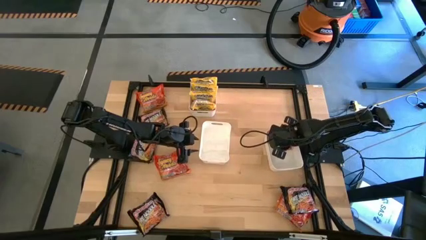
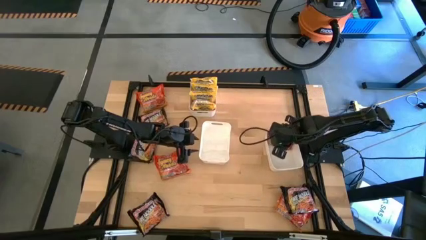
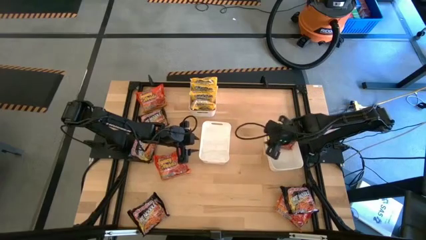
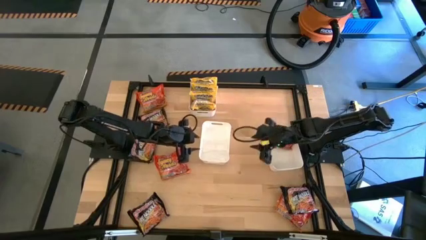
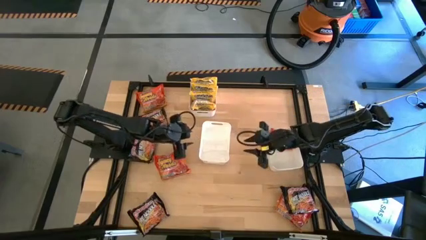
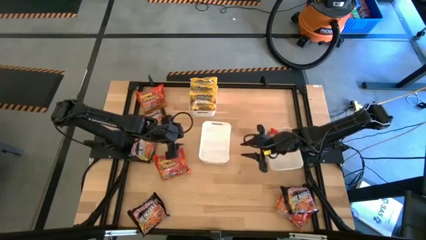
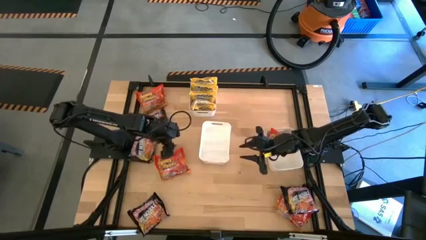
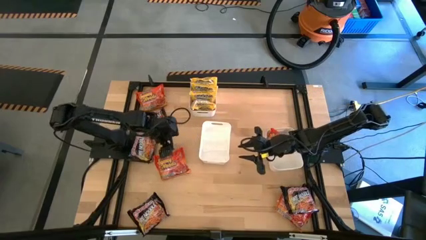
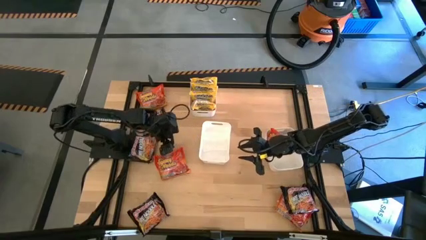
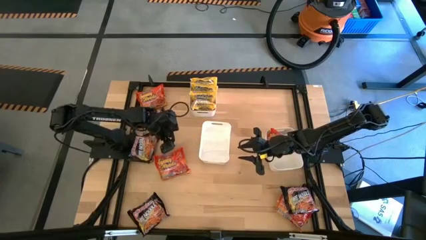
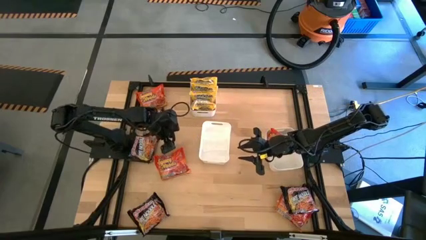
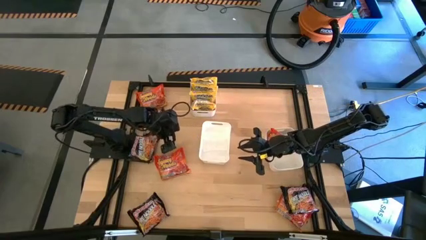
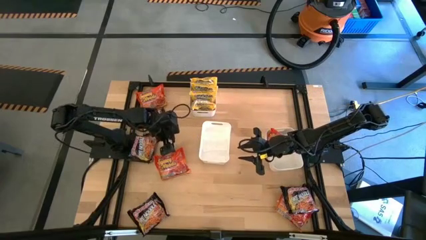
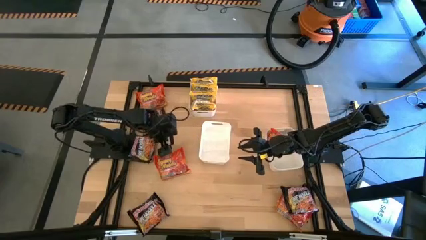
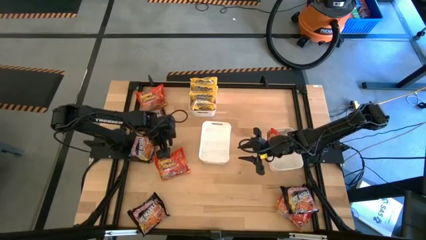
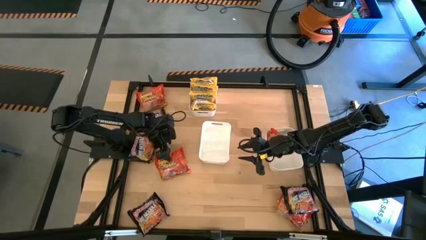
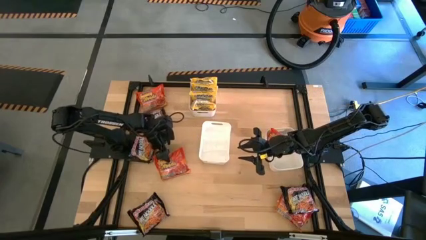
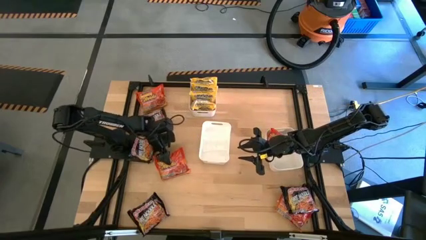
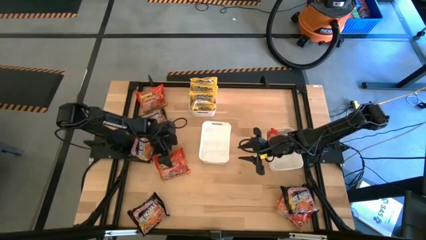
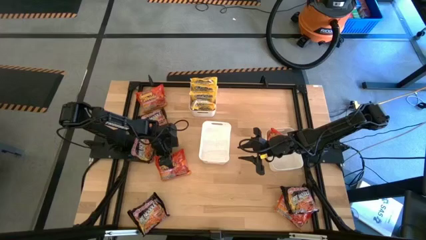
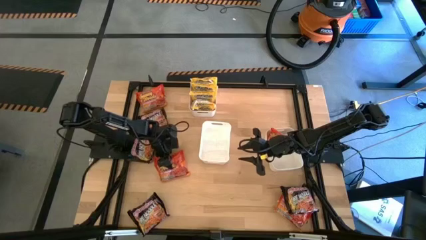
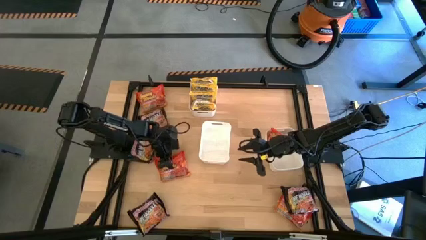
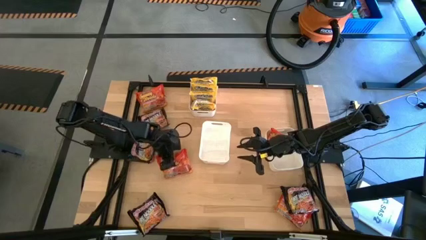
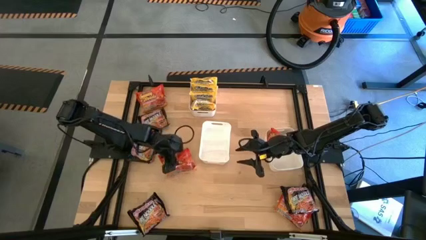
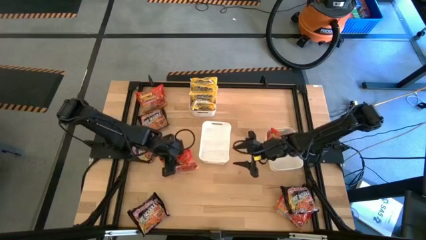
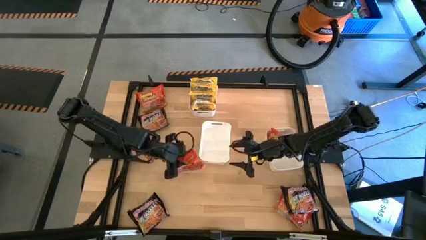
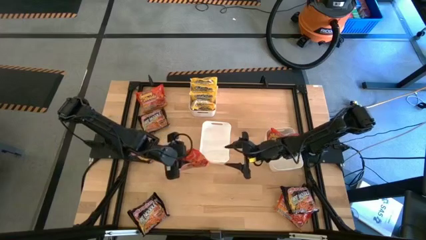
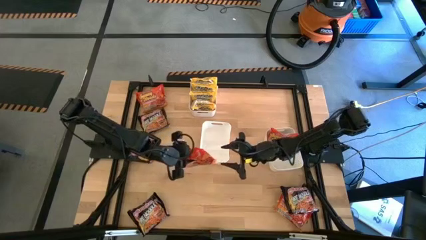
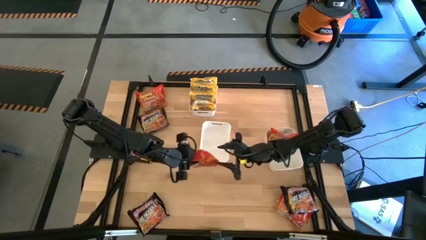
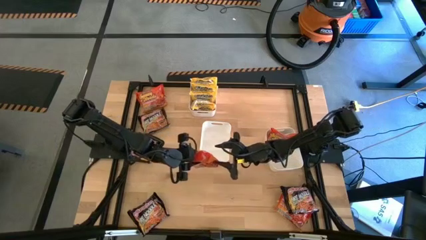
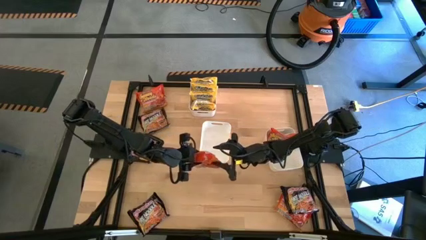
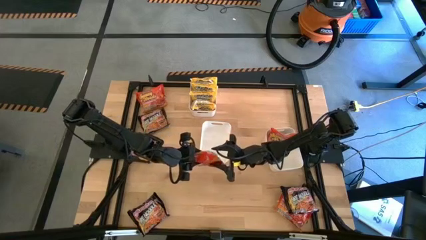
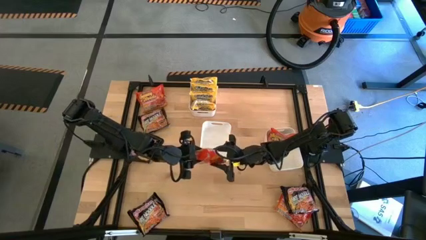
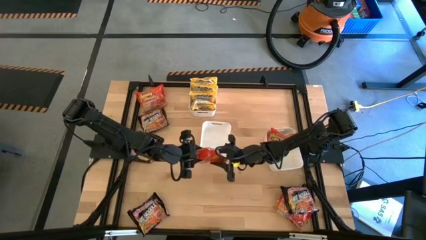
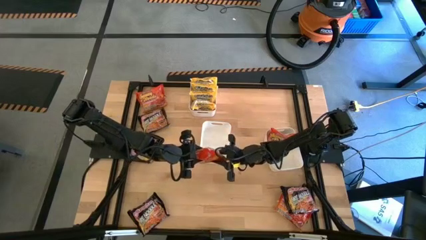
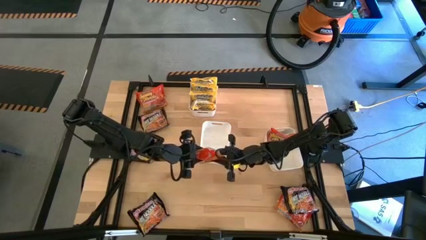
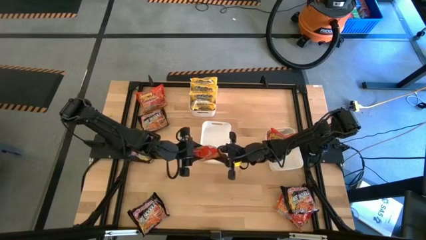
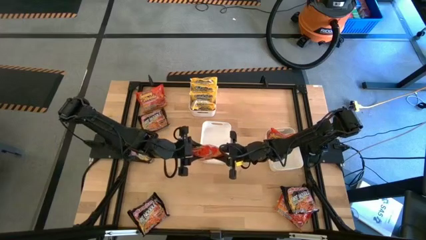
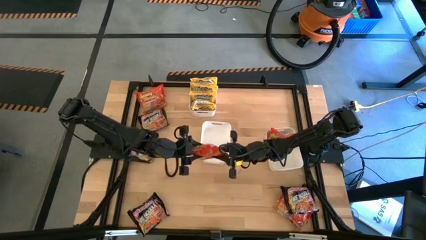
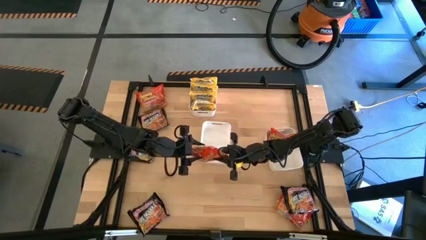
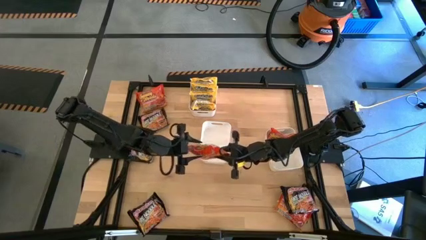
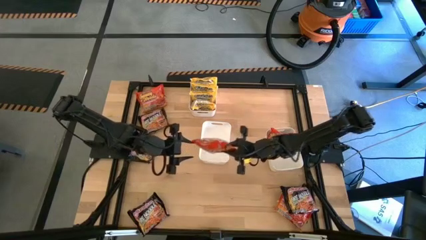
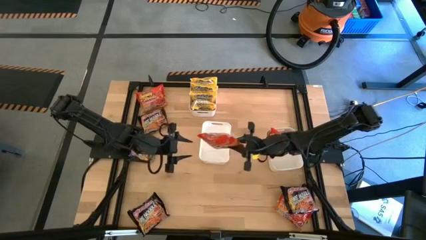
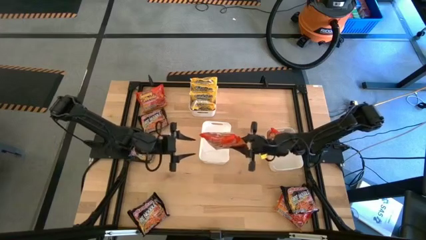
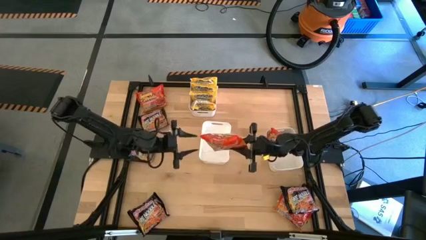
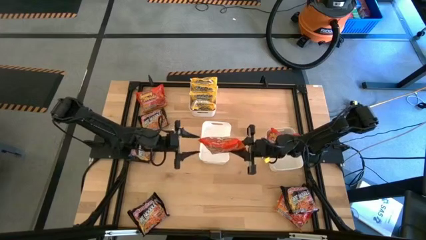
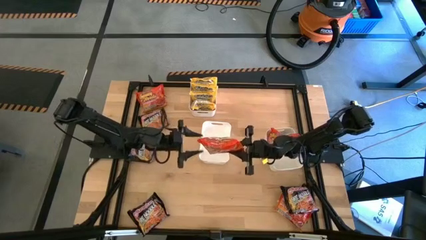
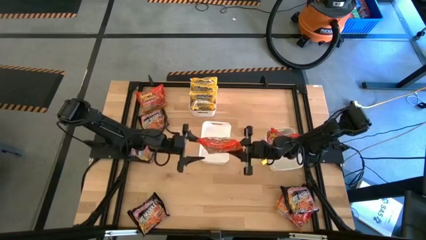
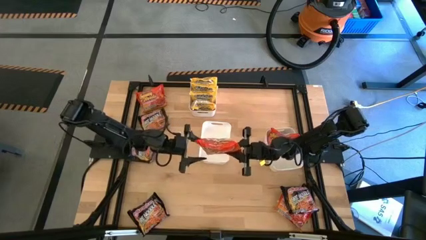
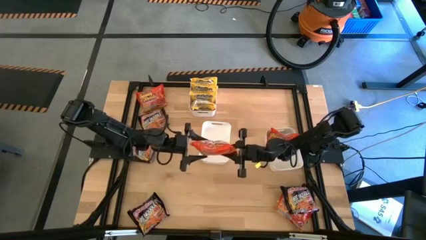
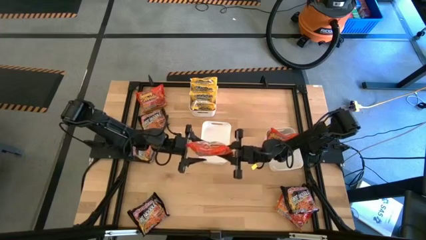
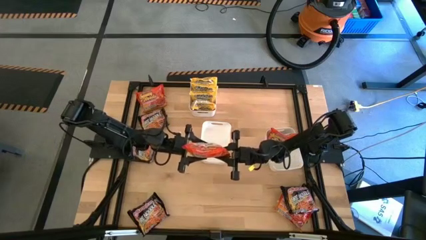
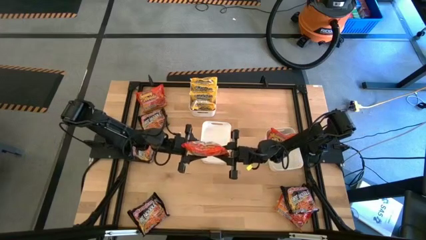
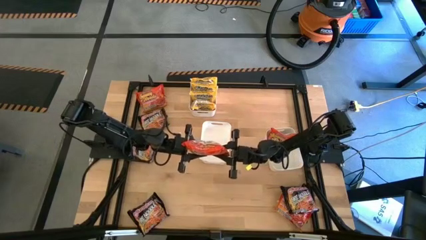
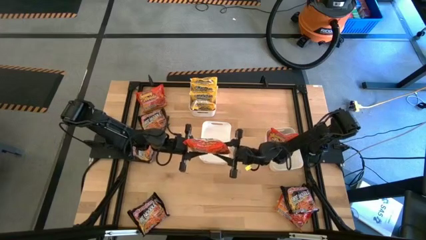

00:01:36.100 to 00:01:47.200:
Task: Sort Maruchan noodles
Put the orange noodle pack into the bottom right white bin
